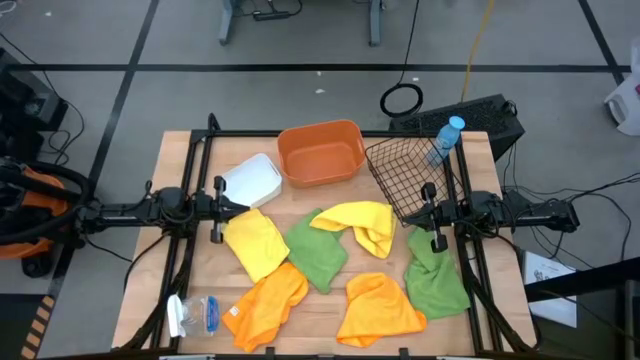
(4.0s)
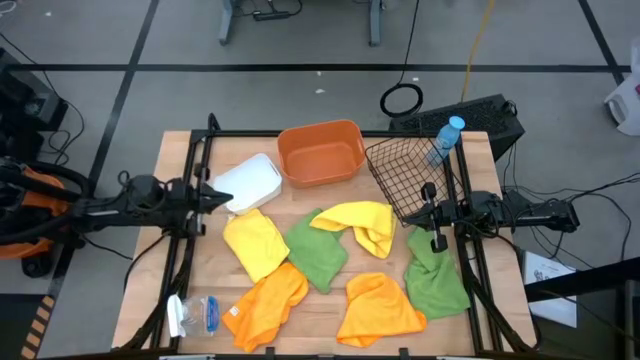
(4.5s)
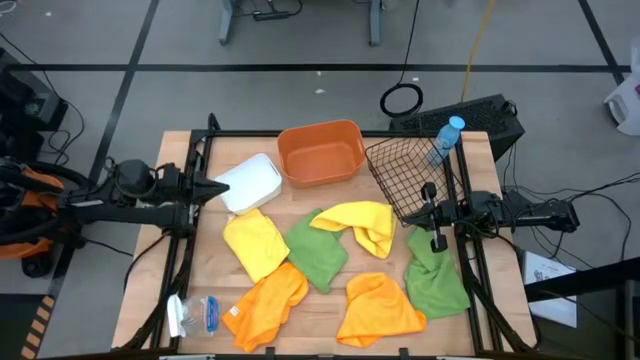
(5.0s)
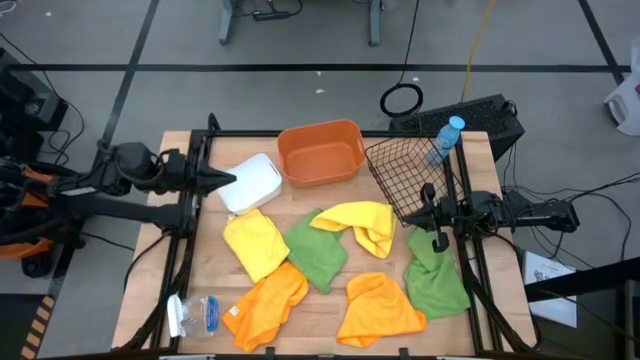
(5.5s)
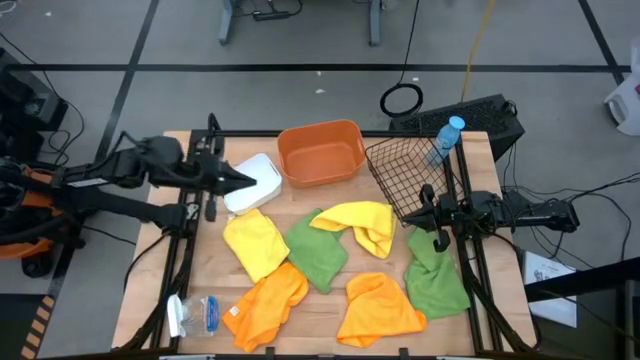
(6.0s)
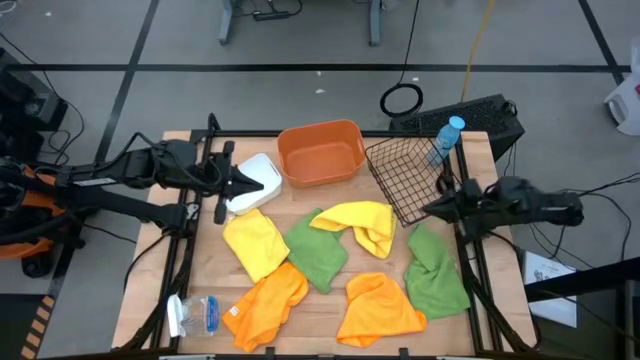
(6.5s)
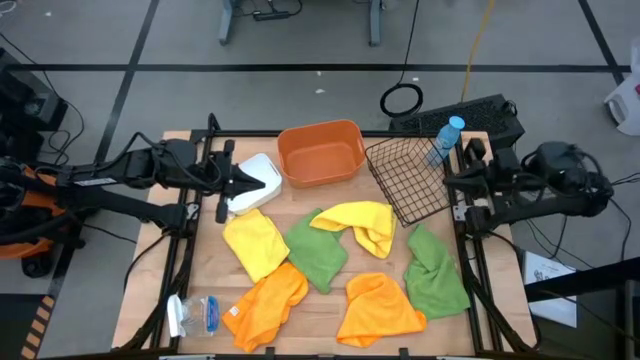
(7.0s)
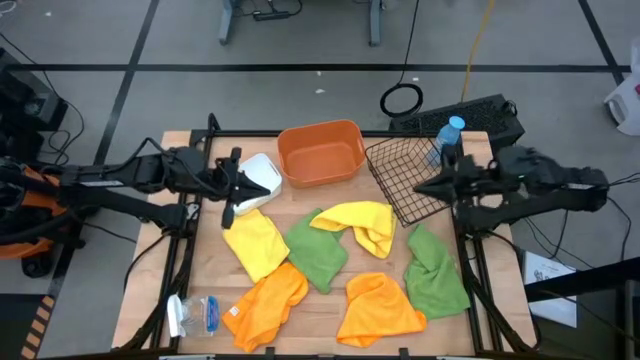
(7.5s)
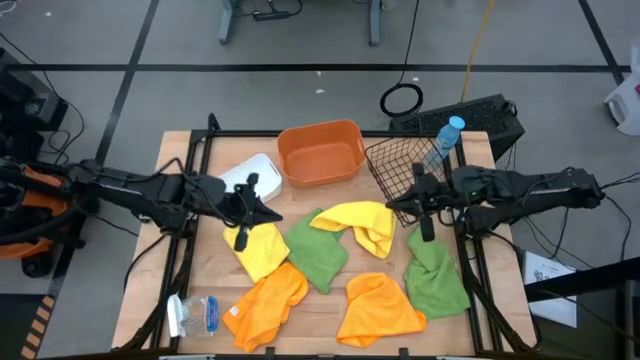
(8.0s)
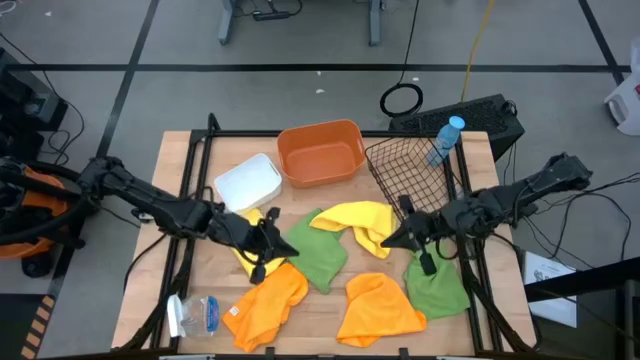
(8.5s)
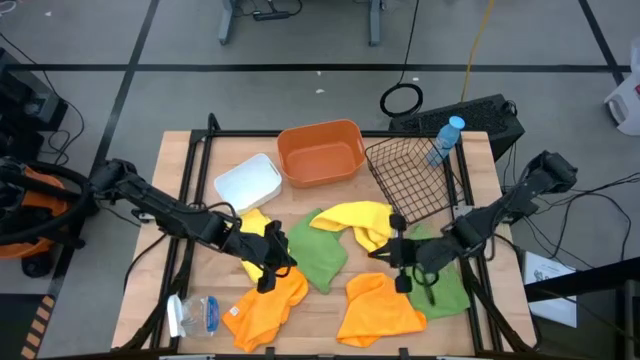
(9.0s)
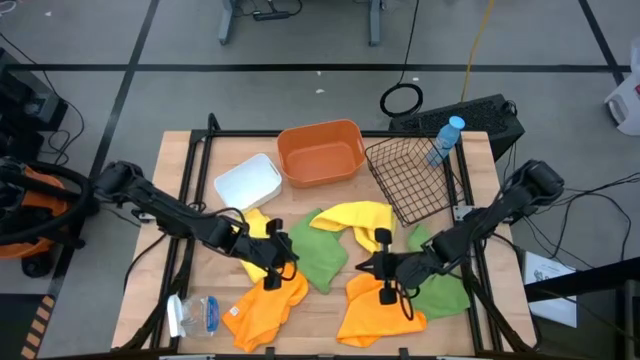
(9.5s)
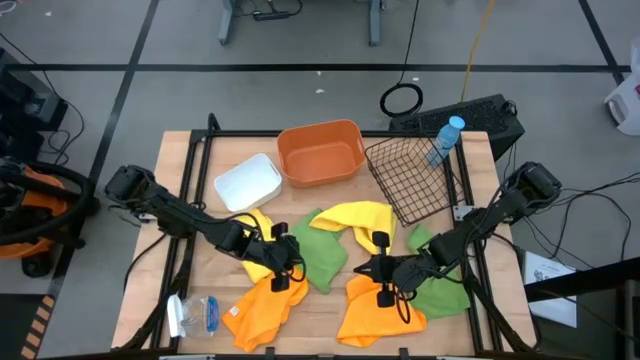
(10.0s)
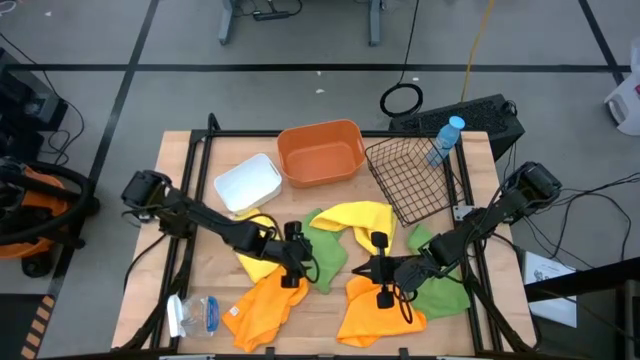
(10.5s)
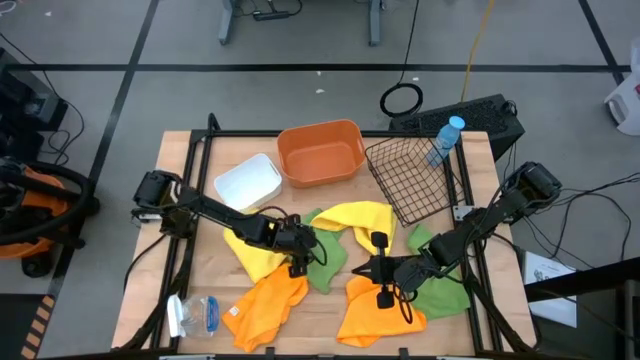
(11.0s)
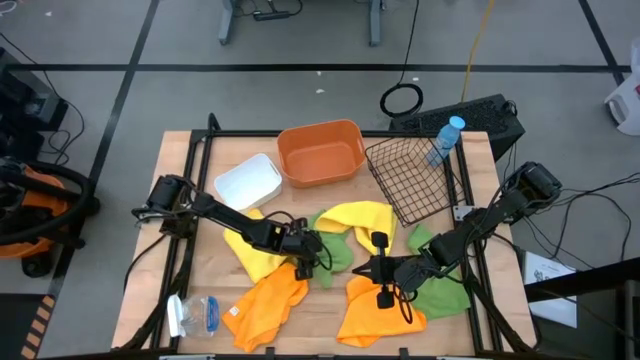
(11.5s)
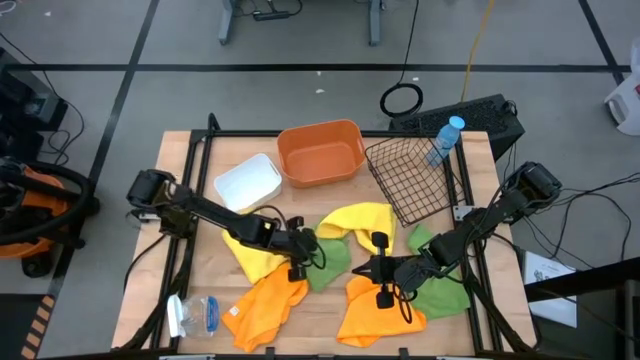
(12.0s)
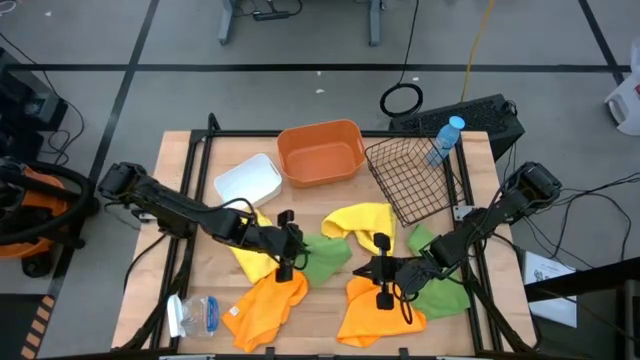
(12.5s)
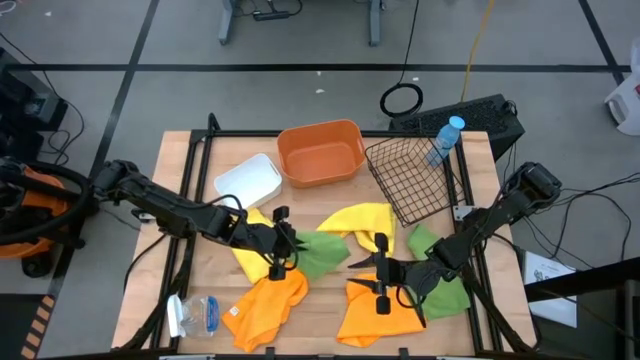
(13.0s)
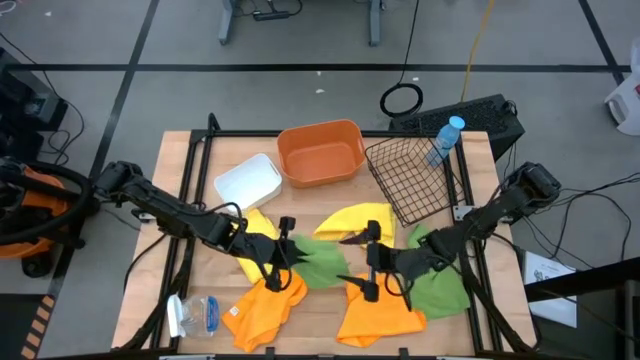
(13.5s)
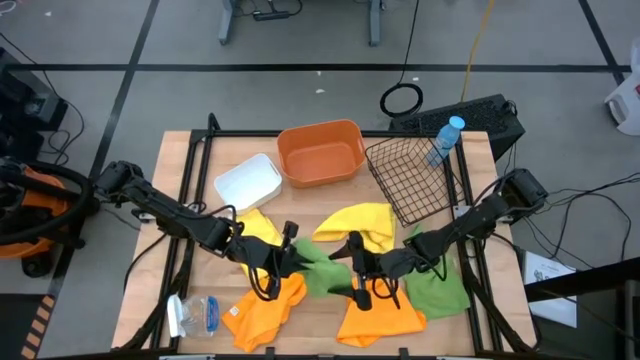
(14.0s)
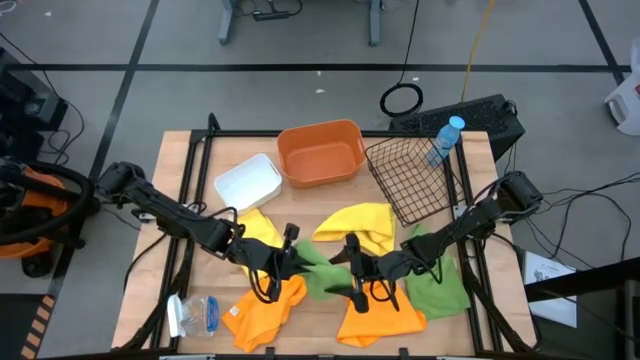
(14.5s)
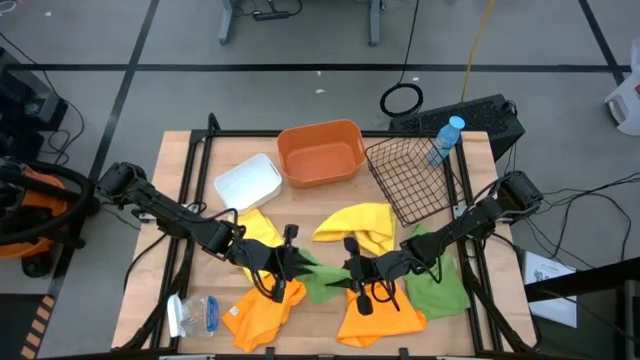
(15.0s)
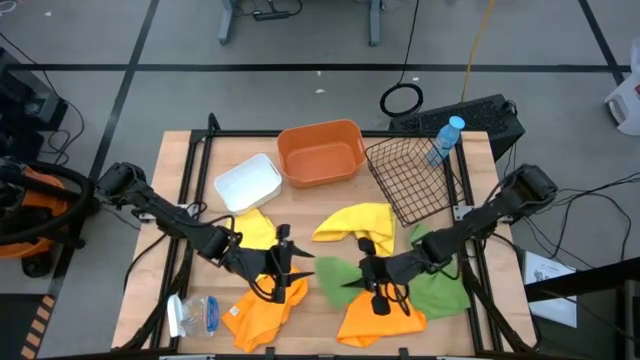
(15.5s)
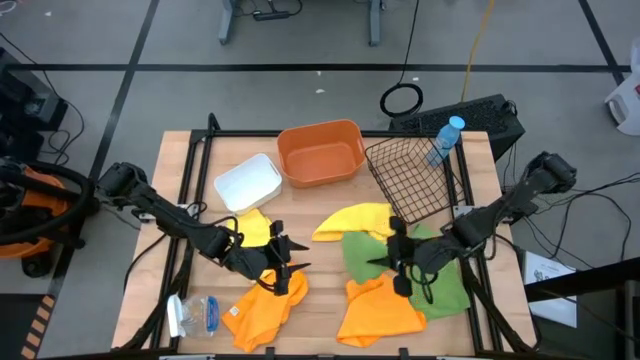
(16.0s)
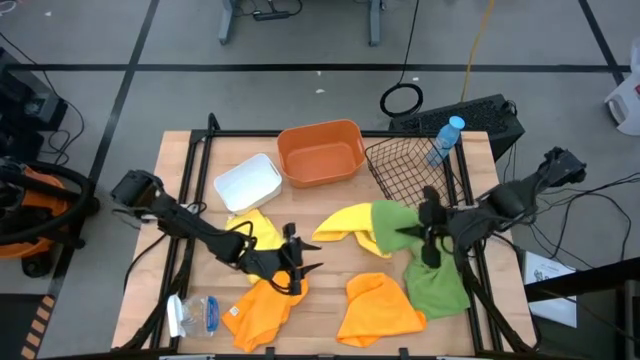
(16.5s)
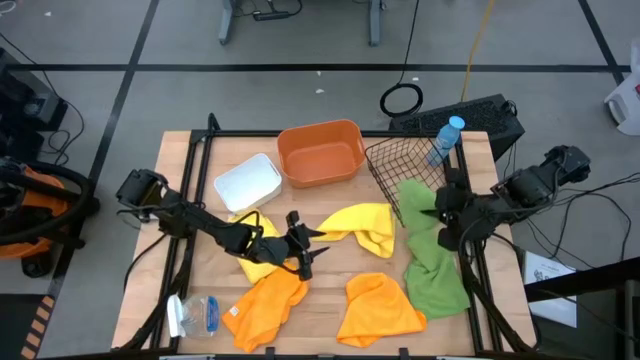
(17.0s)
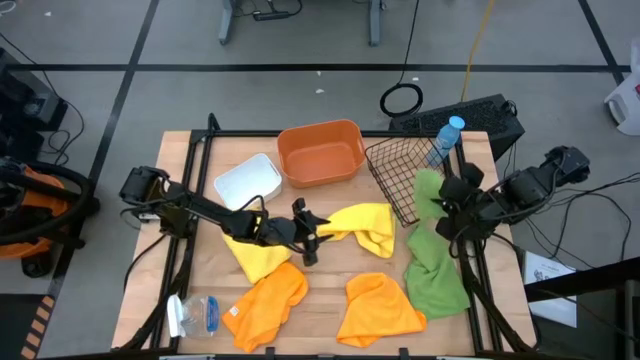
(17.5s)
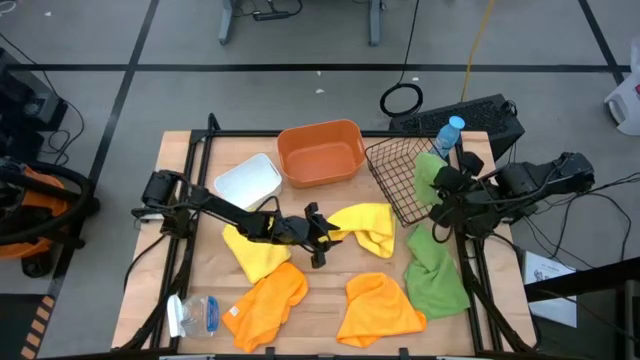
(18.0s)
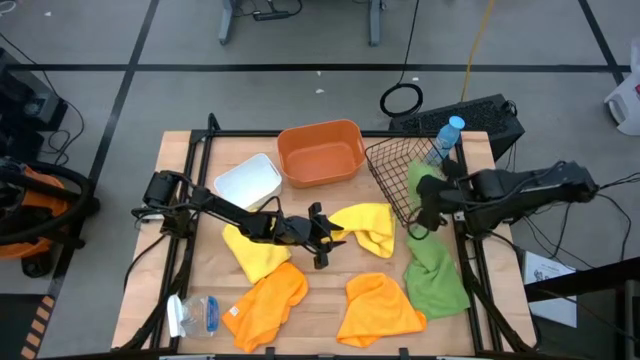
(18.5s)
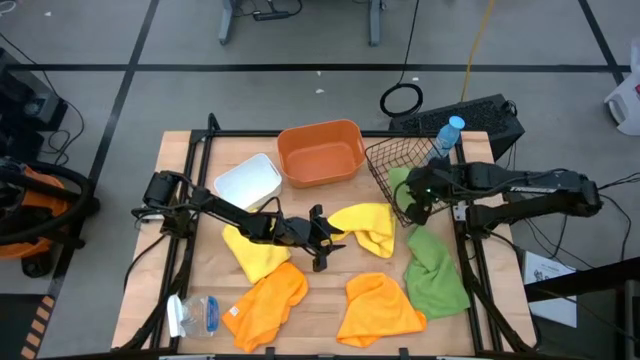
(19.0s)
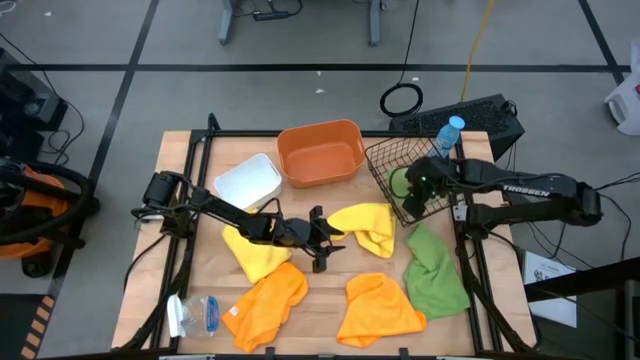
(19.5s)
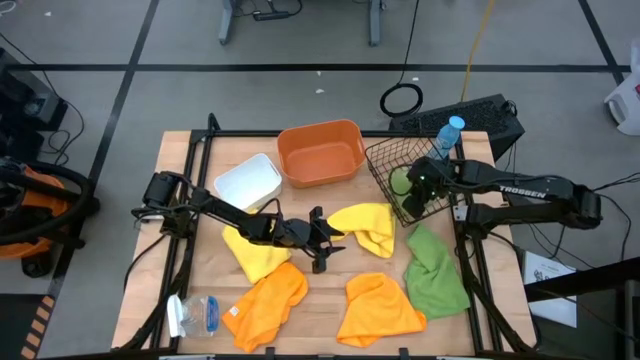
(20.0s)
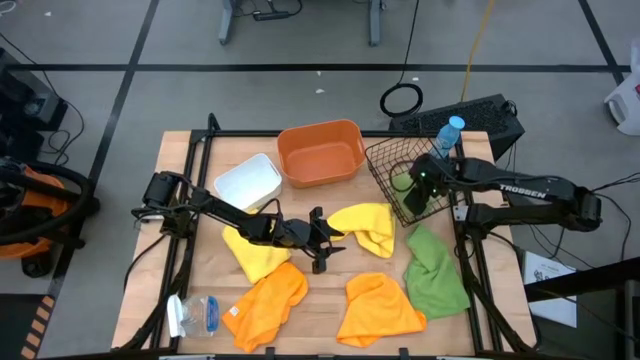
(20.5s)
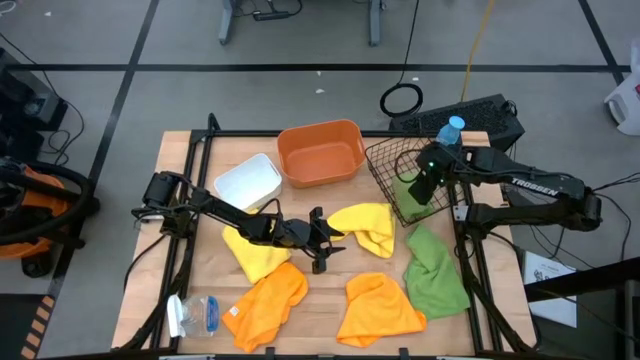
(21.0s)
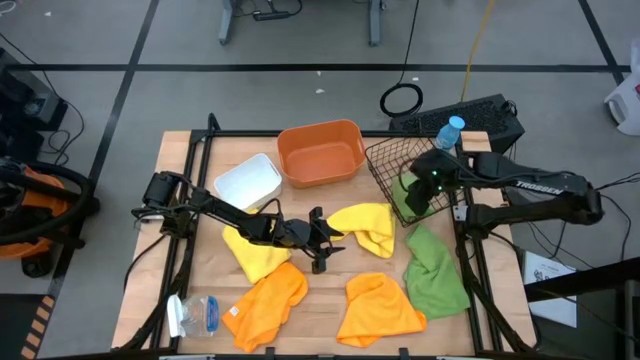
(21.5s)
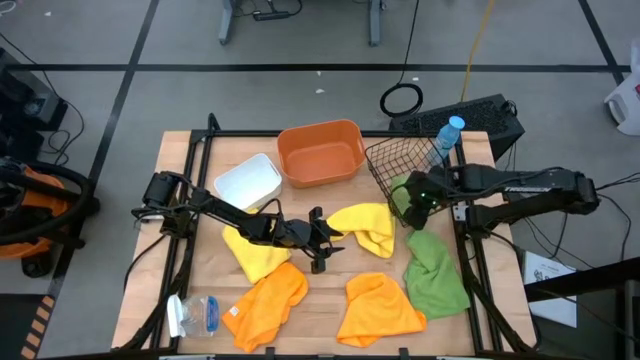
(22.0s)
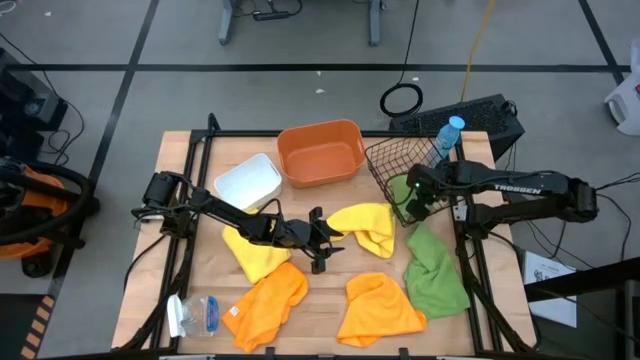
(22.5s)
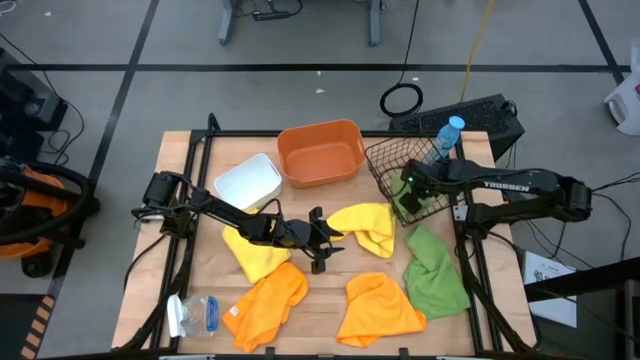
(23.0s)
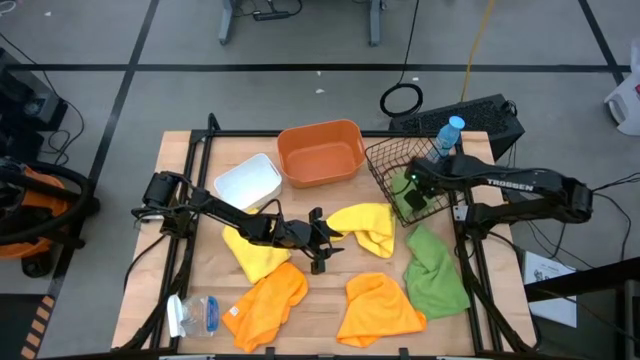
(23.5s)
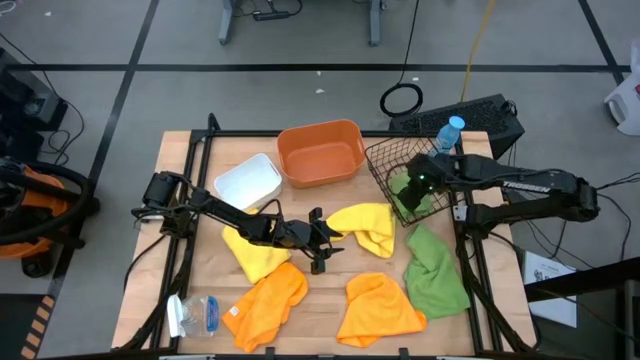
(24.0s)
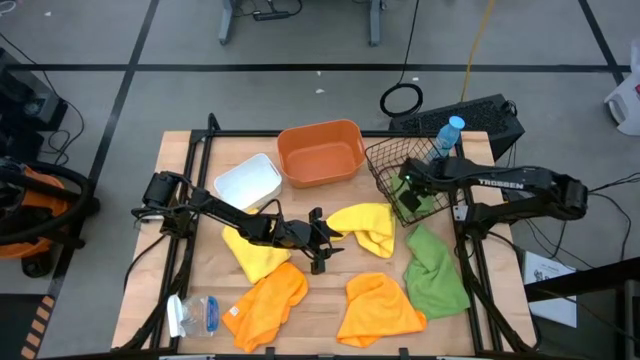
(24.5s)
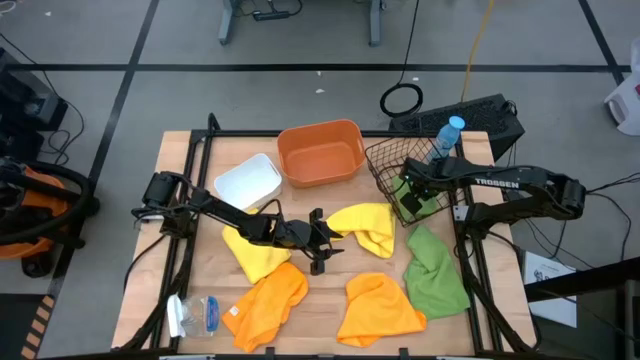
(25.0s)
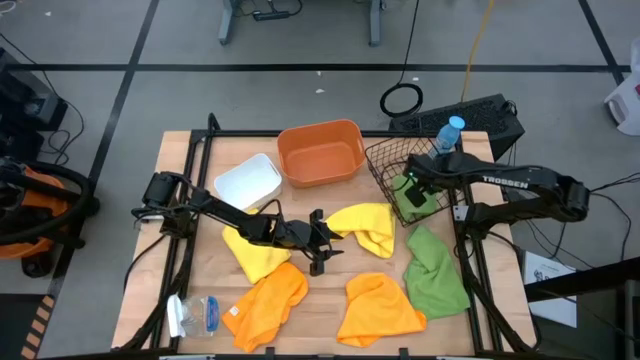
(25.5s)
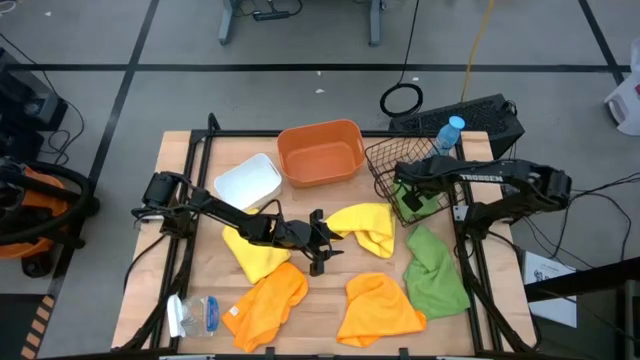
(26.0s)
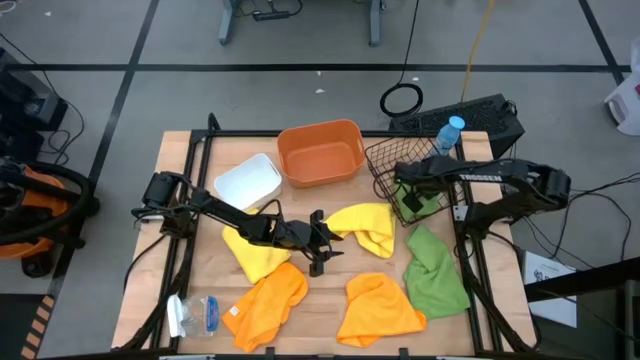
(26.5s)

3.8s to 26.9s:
Task: Sort microfiber towel by color & place in baskets
Put the left green towel into the wire basket
